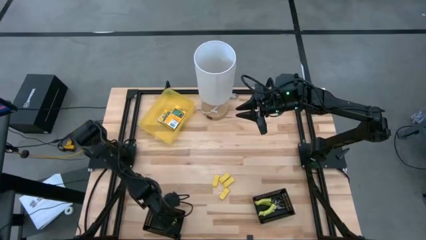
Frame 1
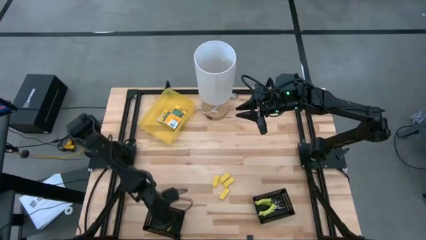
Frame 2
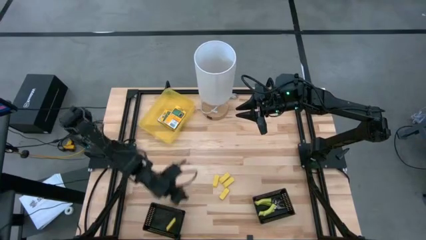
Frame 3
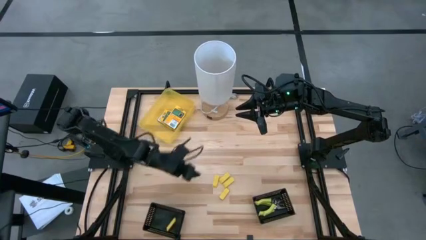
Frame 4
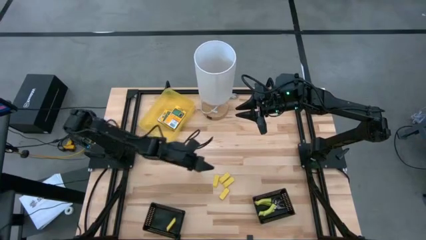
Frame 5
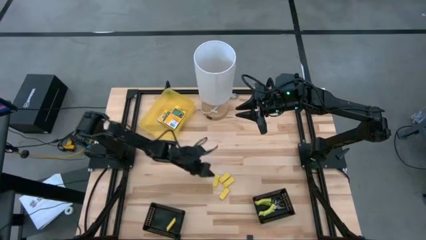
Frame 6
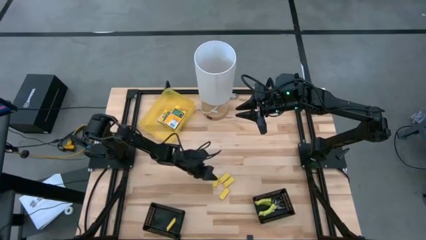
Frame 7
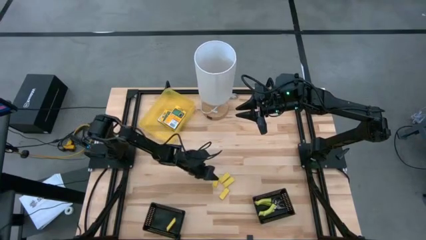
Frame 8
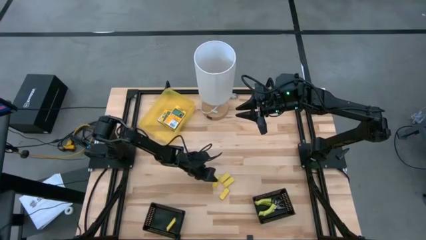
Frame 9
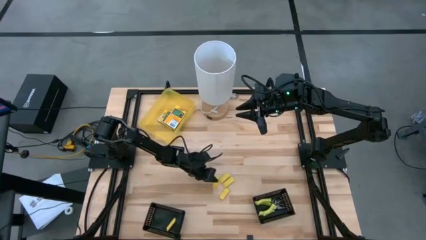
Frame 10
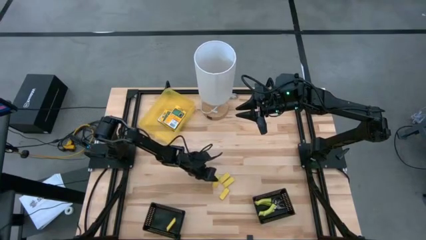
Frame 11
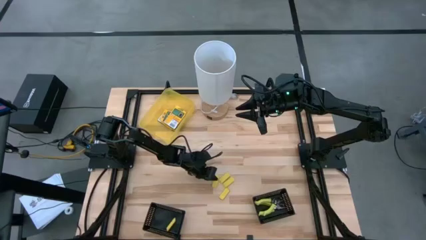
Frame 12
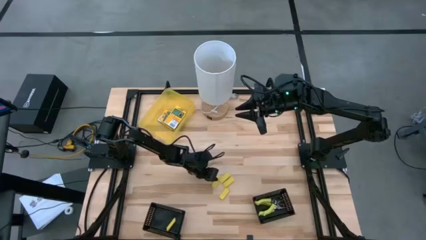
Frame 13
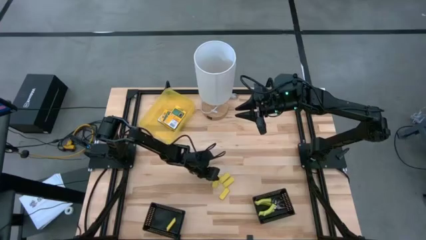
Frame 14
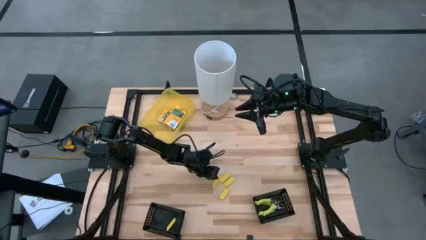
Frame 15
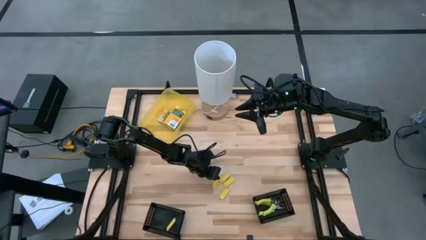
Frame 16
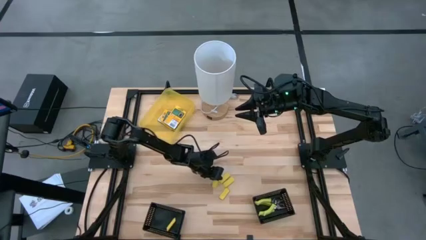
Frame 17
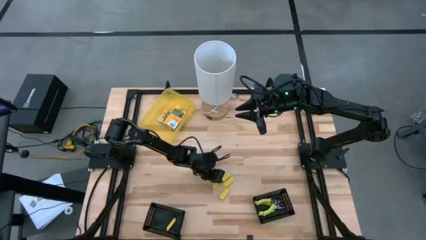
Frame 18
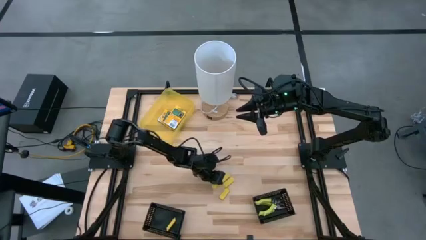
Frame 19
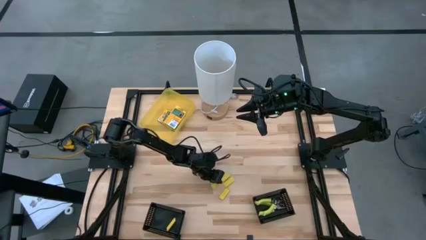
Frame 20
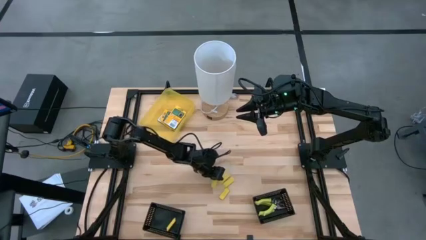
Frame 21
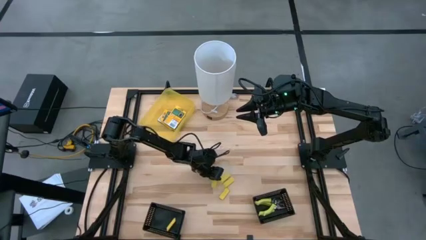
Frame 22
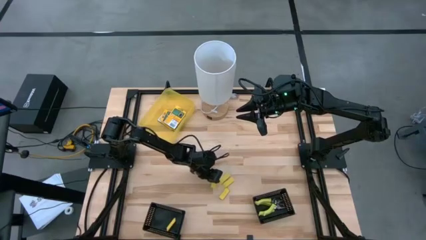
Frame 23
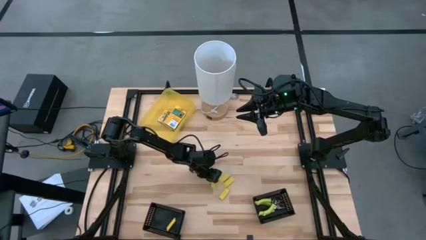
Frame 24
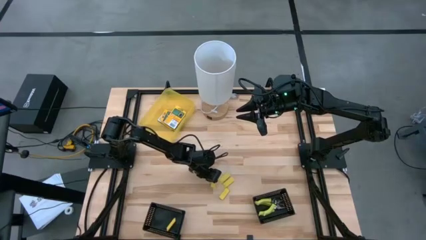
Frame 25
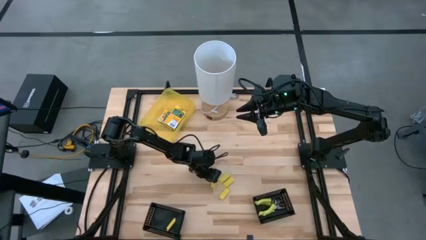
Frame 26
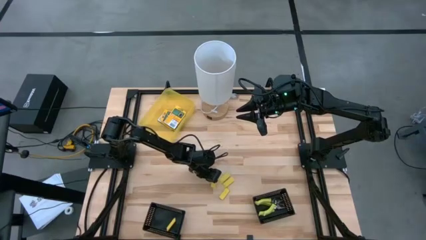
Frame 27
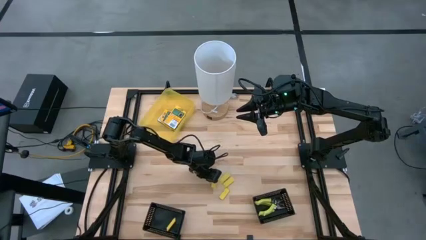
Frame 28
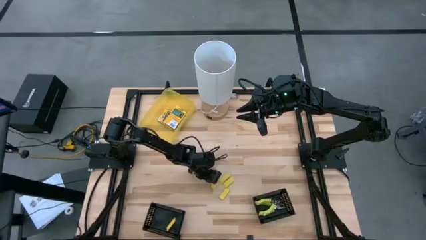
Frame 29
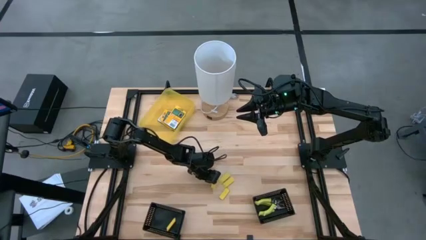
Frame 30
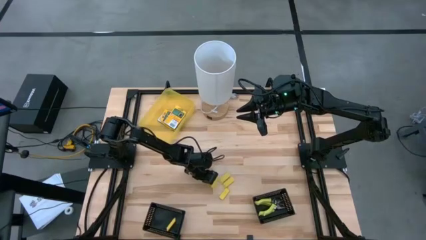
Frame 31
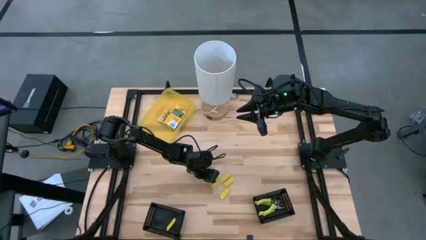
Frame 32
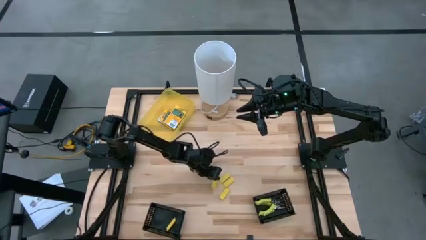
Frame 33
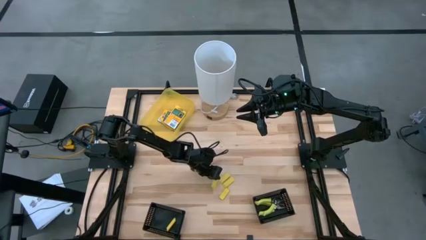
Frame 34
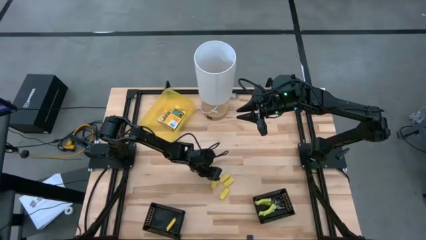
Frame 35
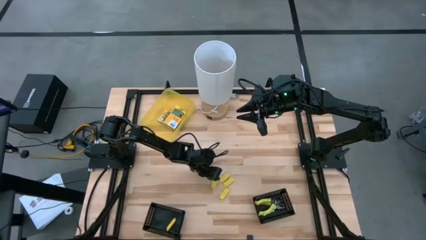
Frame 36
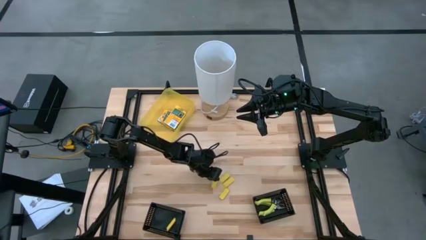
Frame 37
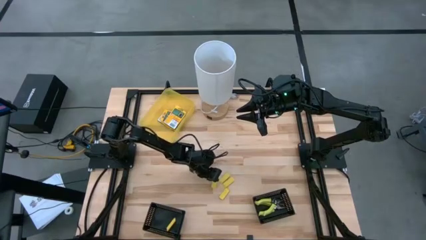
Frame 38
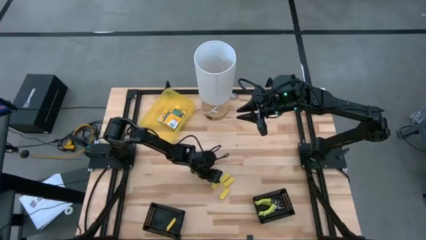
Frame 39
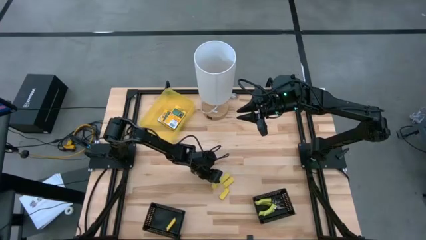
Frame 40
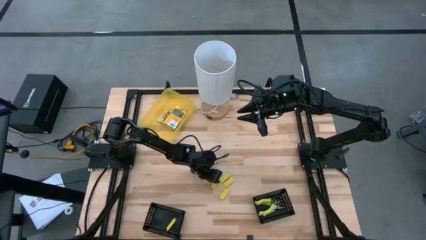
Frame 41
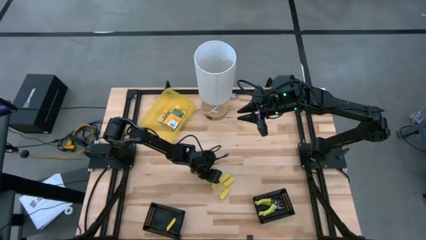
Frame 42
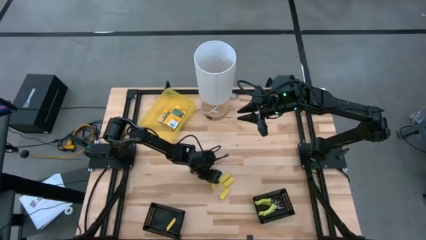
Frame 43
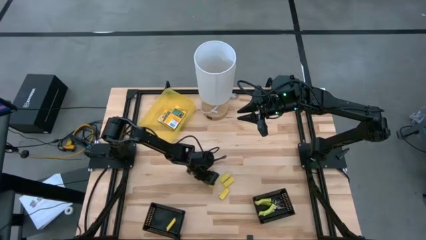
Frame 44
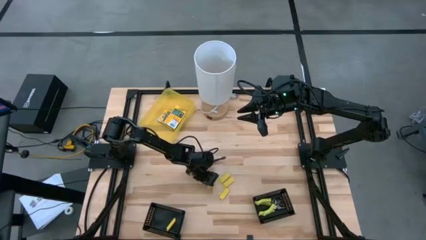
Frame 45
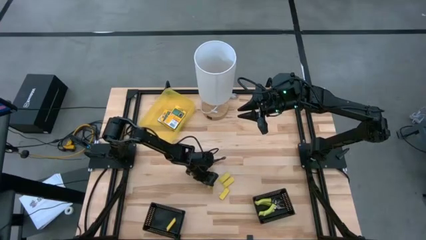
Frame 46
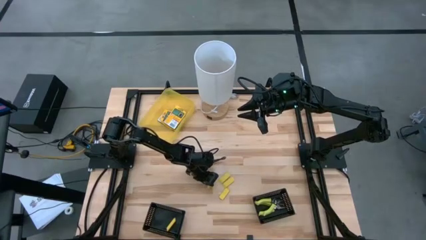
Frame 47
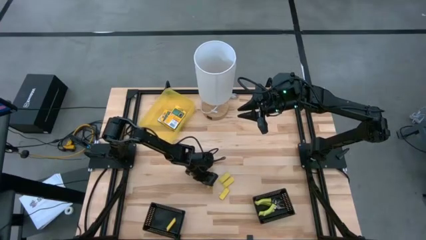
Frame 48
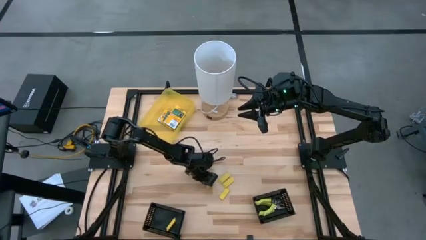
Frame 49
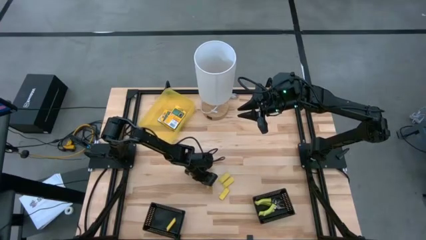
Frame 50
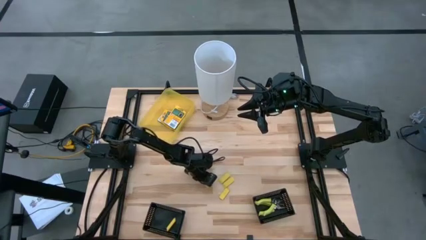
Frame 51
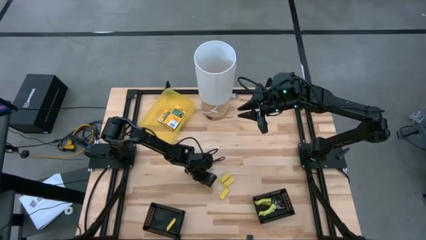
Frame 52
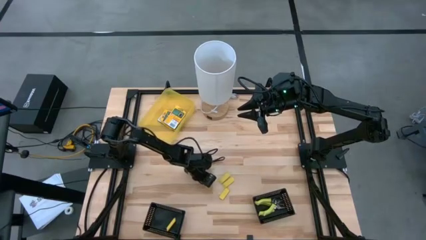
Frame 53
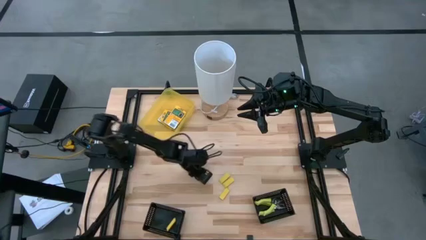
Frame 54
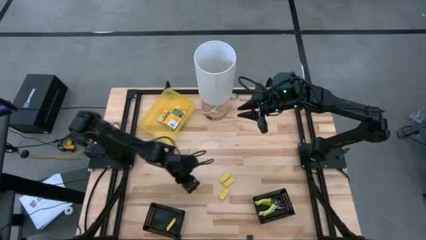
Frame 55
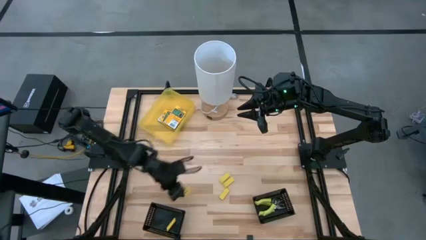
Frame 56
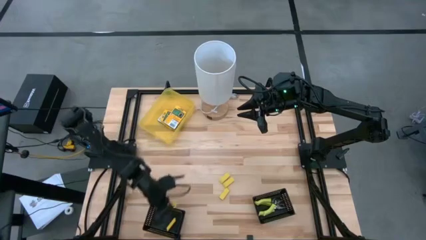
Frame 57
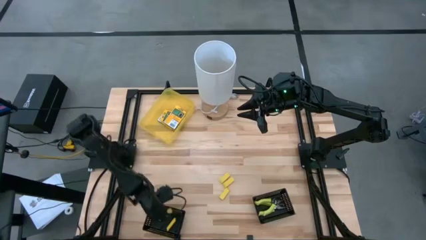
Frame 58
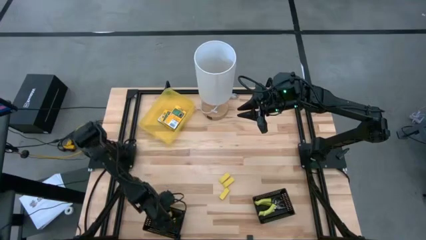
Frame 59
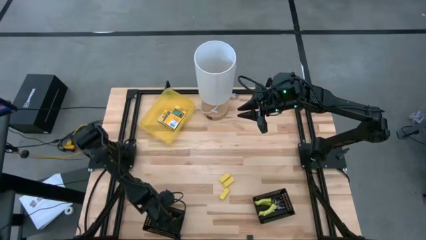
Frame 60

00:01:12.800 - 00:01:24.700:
Task: Pick & Place School Supplies
Put the eraser into the bottom left black bin

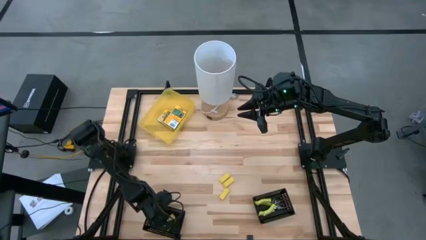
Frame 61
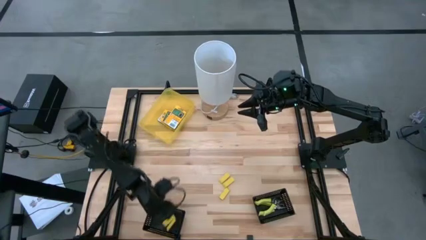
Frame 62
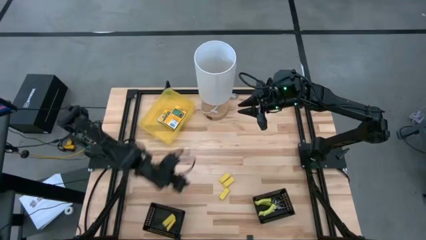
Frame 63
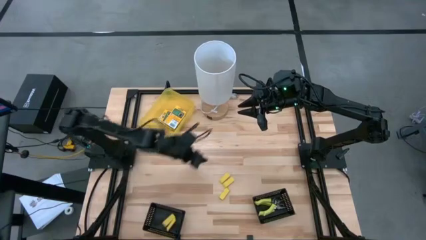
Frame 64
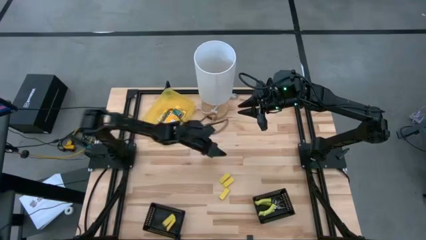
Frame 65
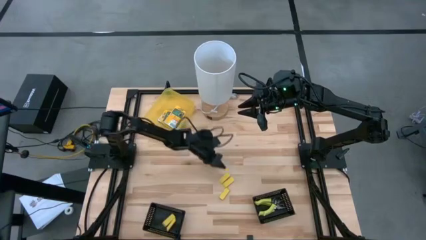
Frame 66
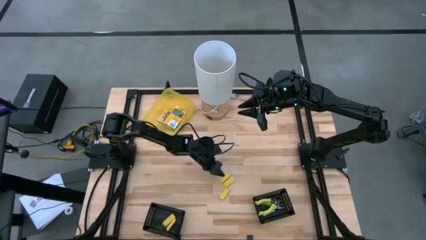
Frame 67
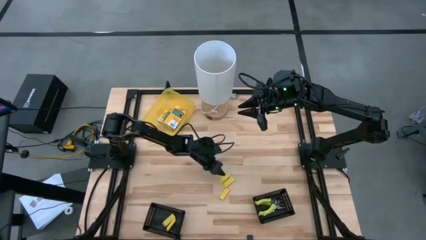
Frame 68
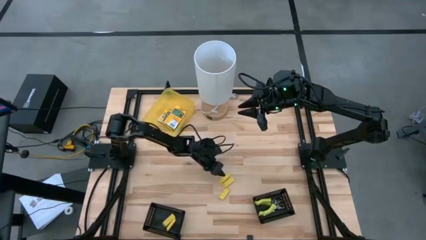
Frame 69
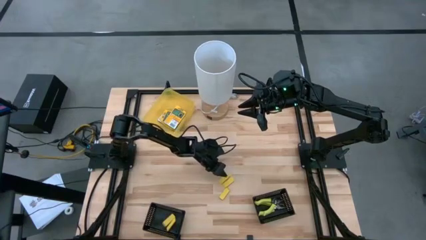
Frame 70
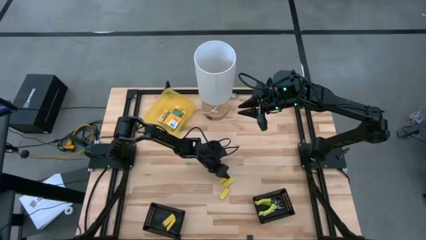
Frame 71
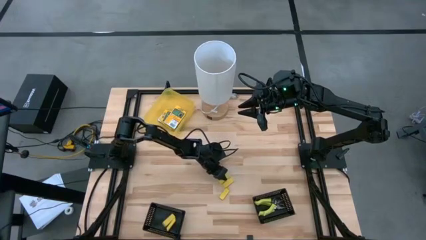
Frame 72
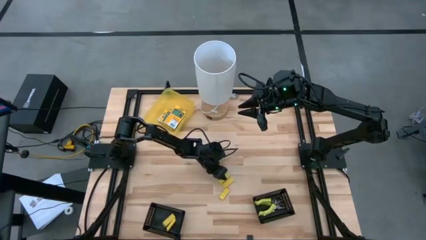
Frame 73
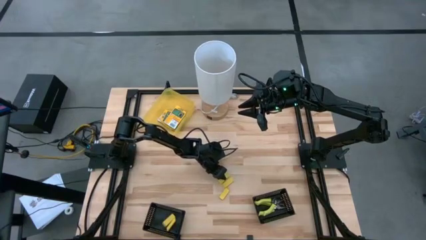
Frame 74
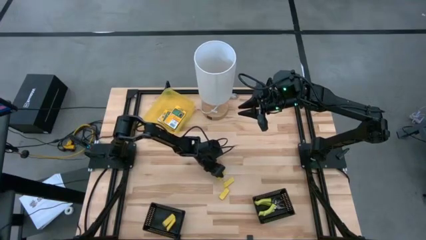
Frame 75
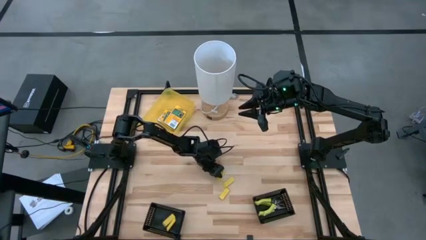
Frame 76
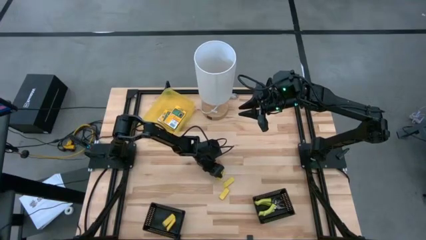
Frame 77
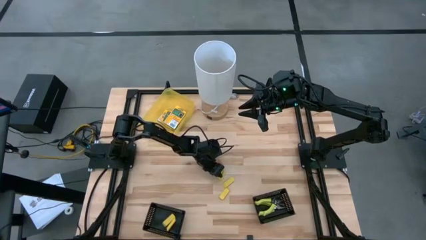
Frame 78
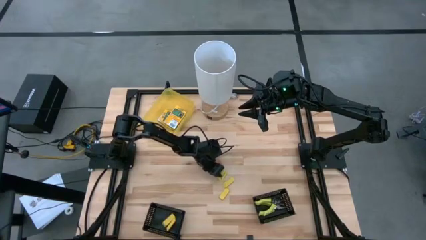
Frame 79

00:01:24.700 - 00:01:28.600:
Put the eraser into the bottom left black bin

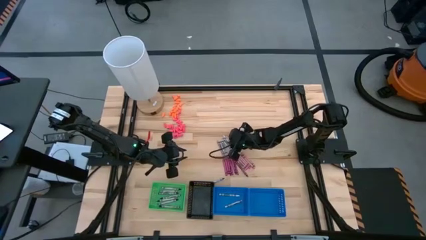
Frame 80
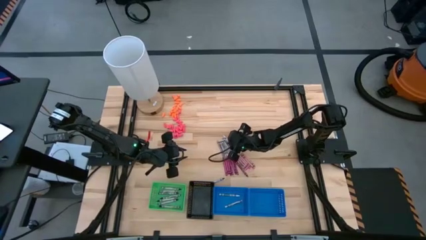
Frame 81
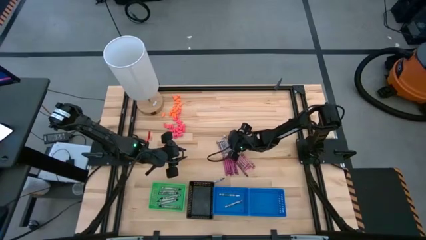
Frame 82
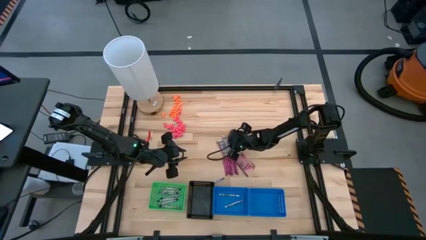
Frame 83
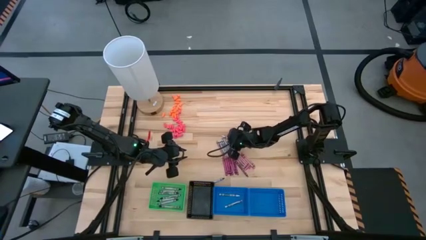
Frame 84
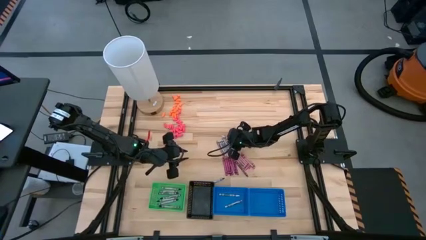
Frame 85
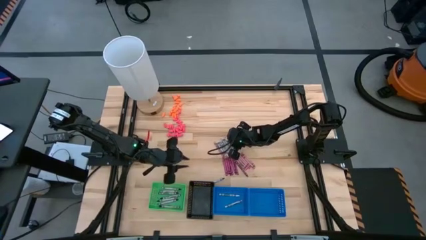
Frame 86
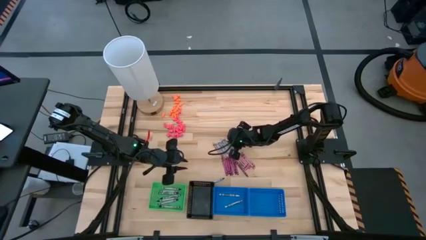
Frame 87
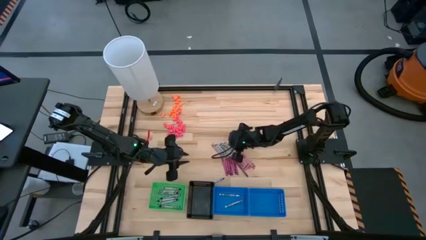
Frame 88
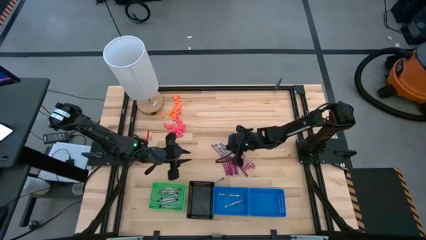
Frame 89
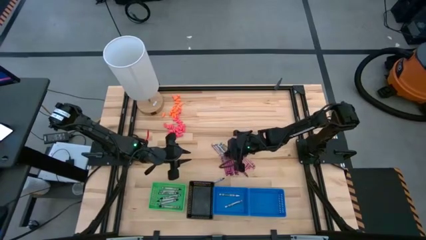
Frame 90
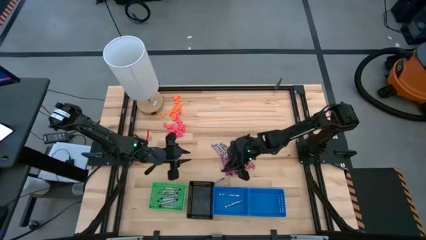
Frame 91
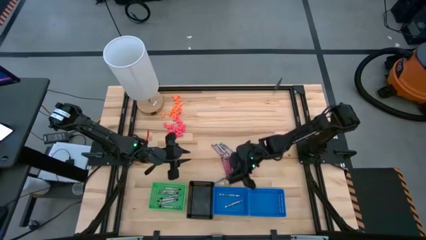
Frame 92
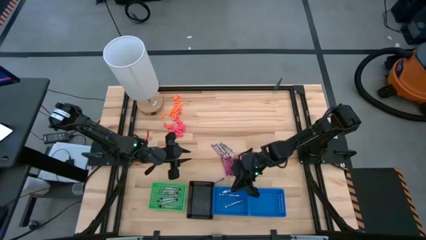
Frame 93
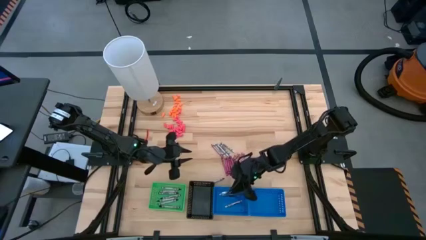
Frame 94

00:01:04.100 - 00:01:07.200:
Task: Sort crayons
Put the white crayon into the left blue bin
